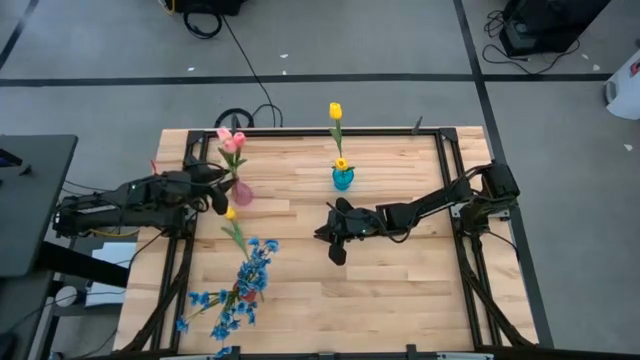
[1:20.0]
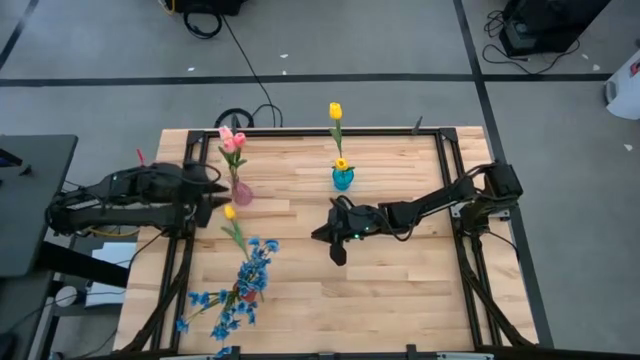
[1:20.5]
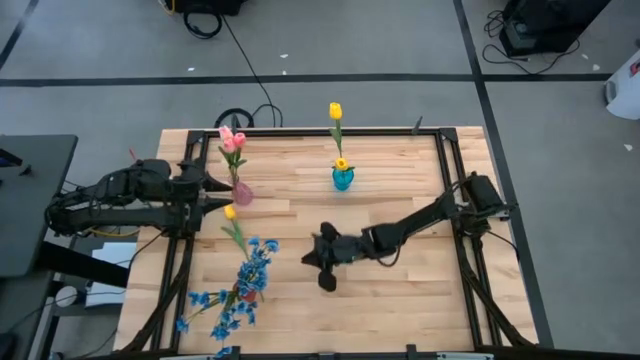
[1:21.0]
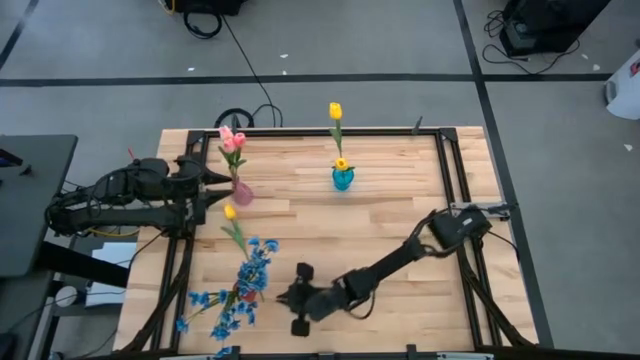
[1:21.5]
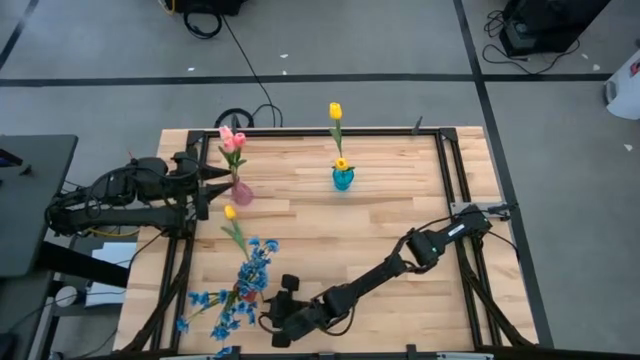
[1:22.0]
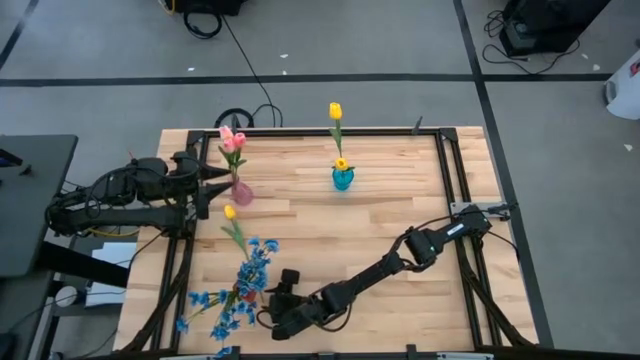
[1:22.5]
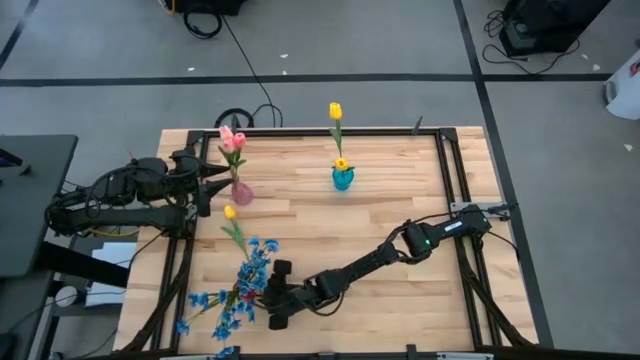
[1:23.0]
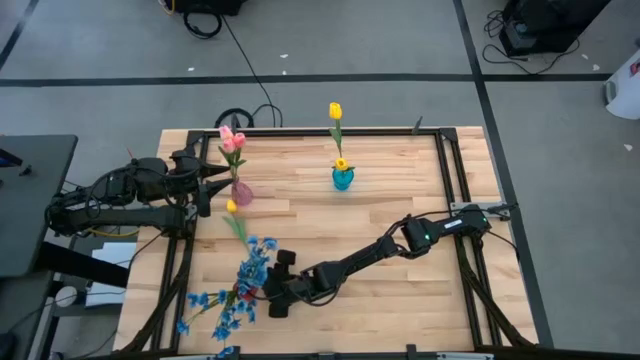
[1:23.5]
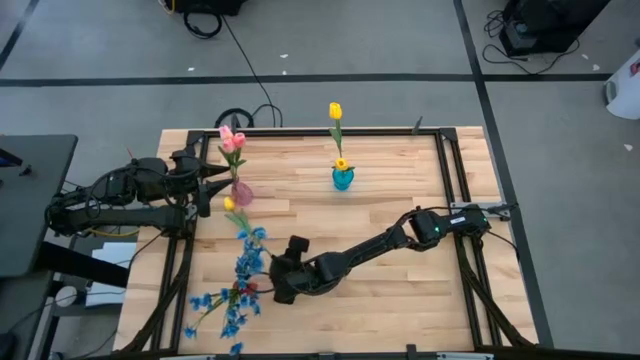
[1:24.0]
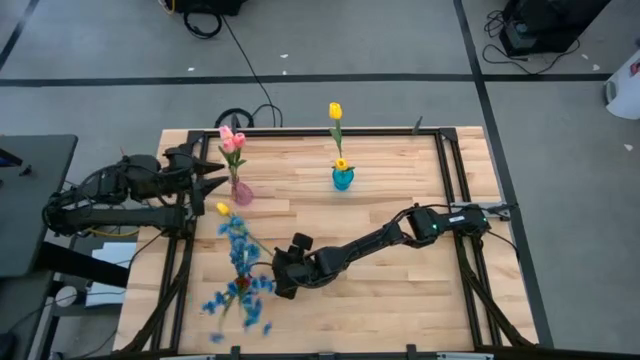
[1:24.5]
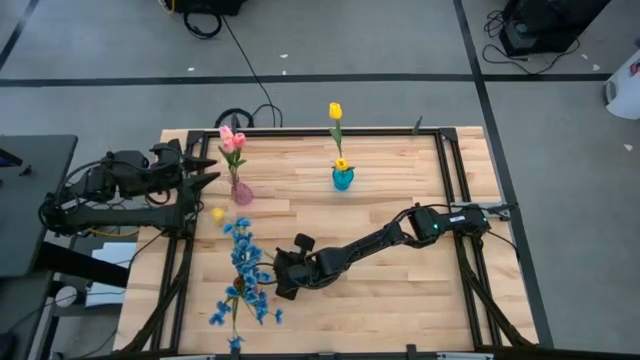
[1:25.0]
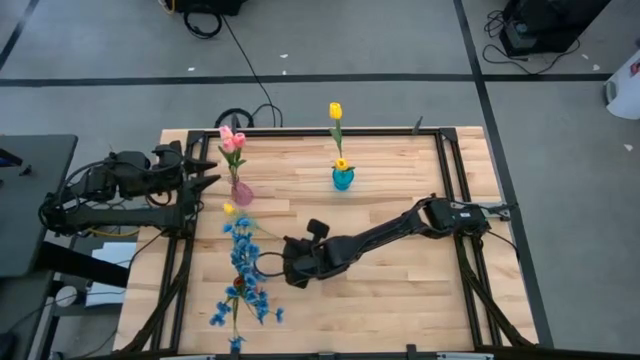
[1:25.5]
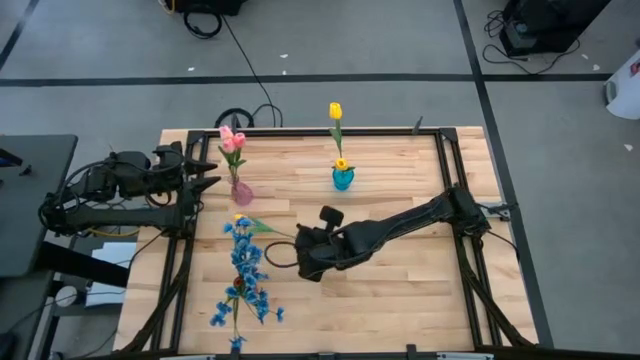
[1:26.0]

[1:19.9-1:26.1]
Task: Sort flowers into vase by color
Put the yellow tulip into the blue vase

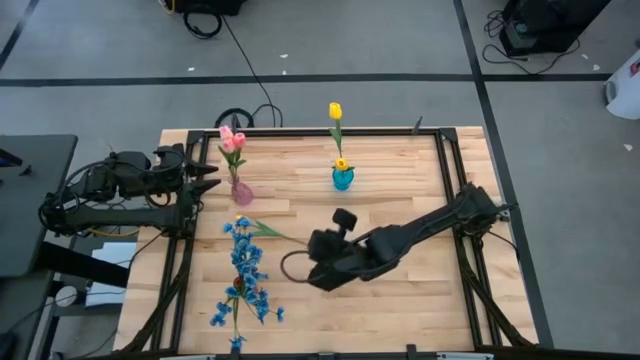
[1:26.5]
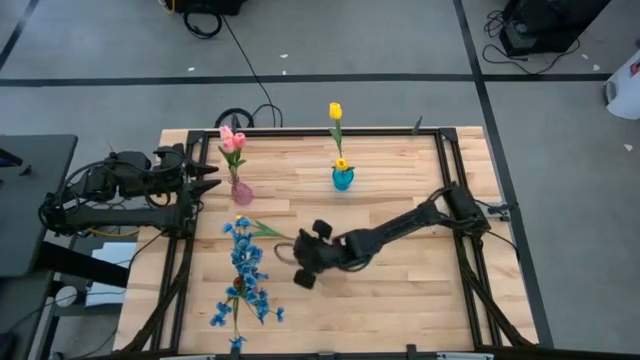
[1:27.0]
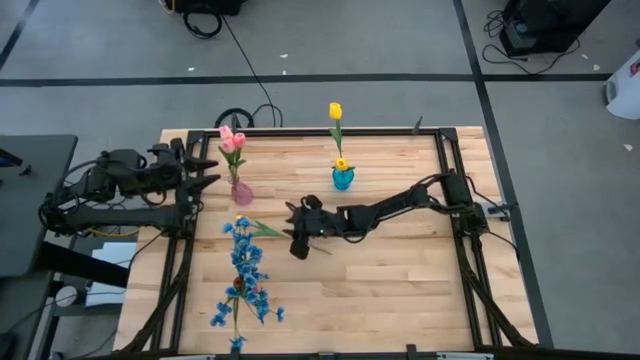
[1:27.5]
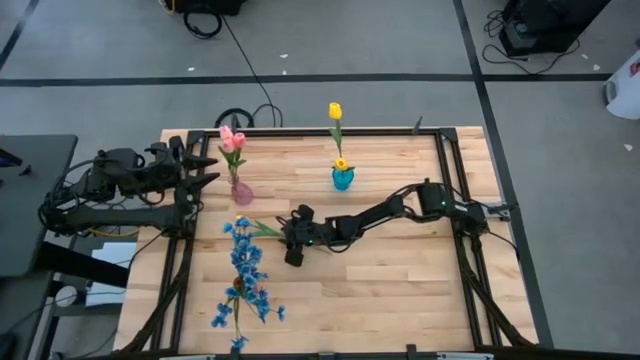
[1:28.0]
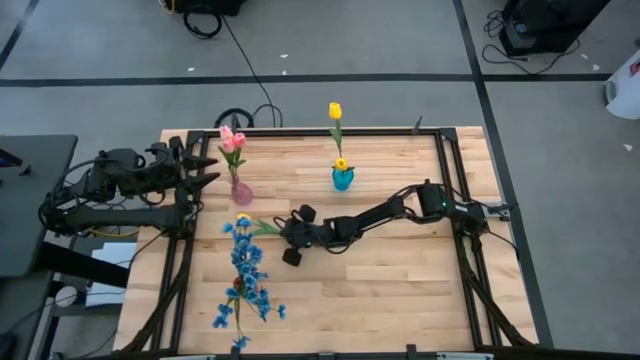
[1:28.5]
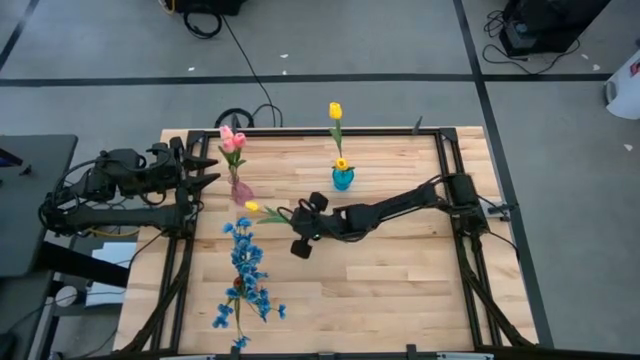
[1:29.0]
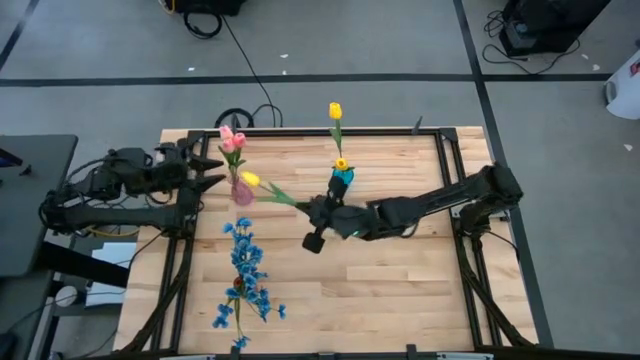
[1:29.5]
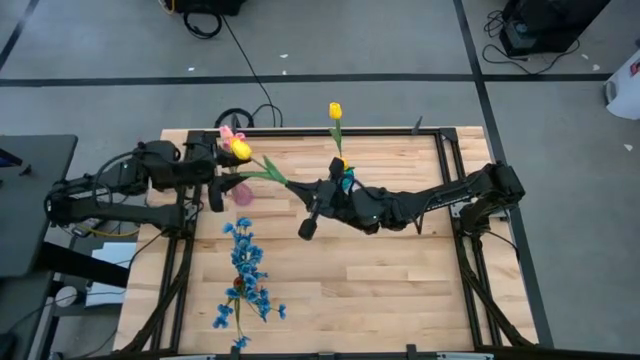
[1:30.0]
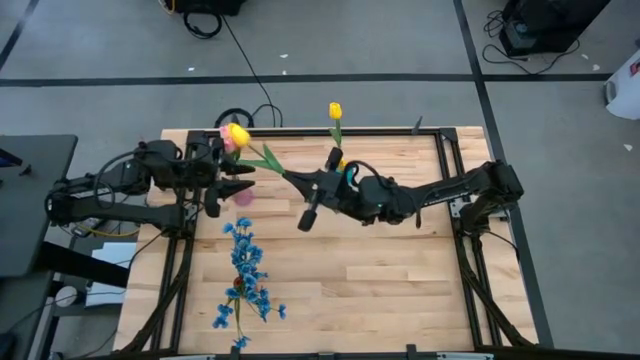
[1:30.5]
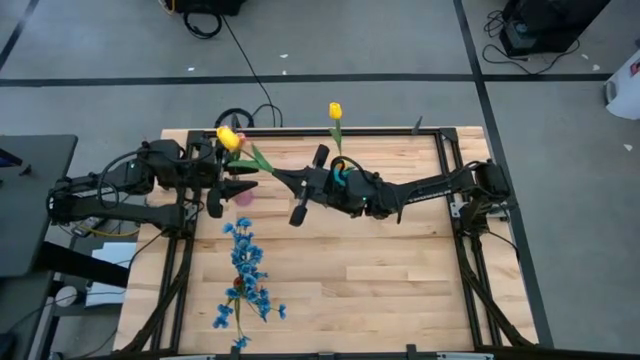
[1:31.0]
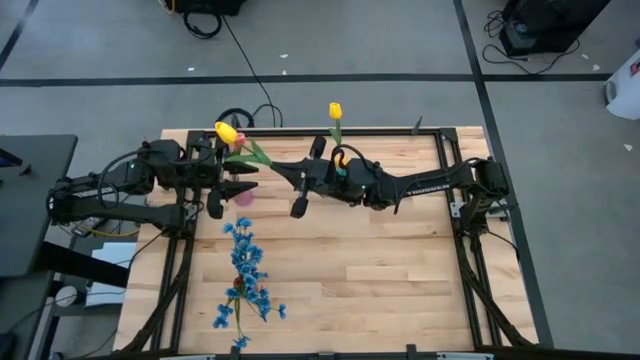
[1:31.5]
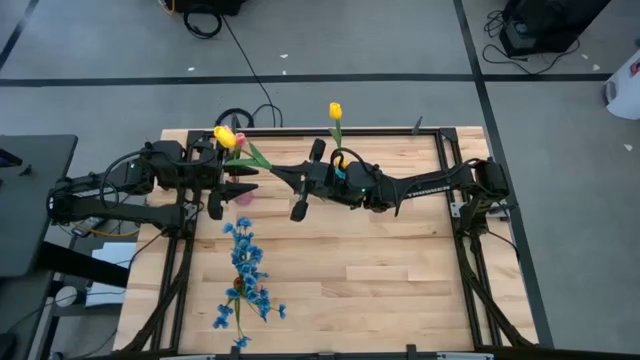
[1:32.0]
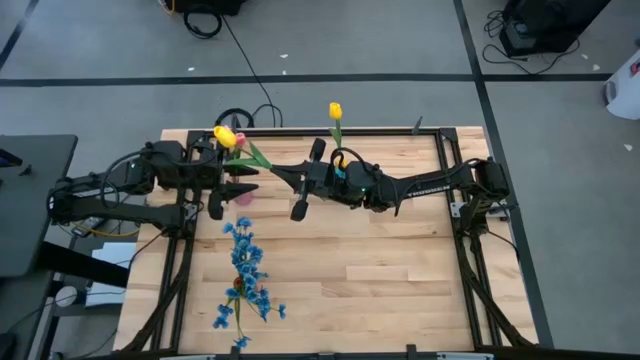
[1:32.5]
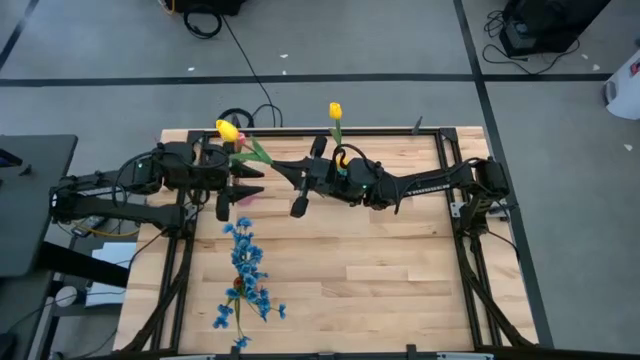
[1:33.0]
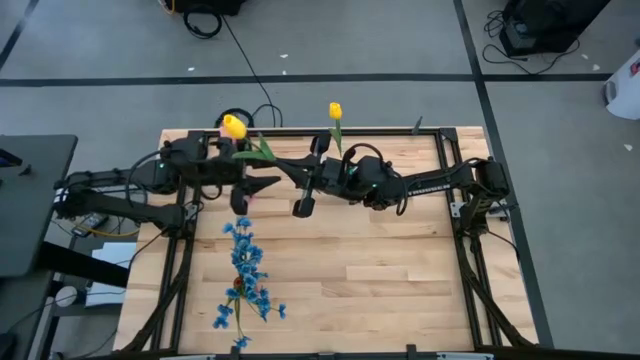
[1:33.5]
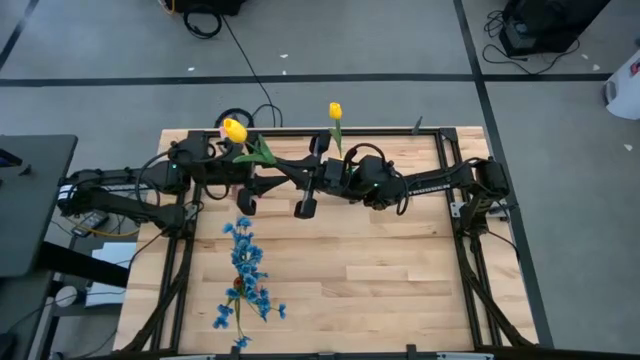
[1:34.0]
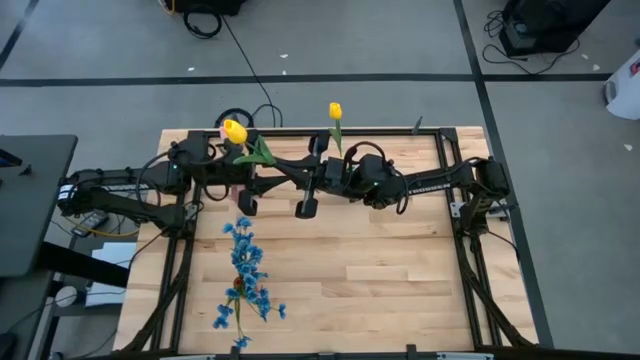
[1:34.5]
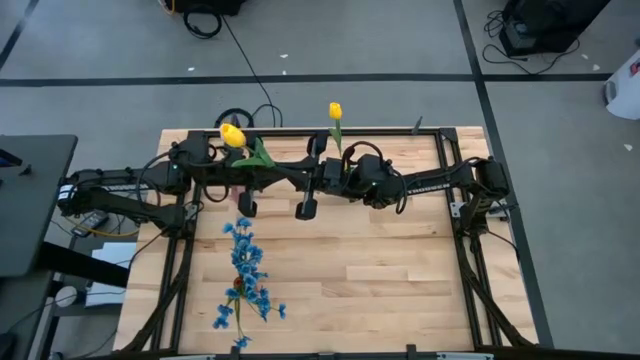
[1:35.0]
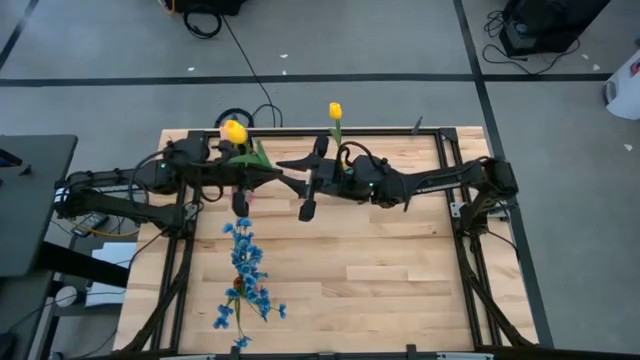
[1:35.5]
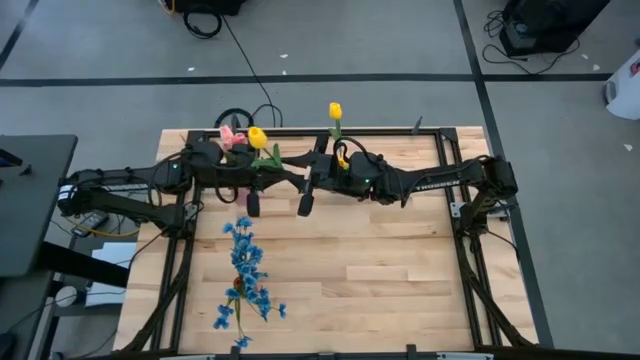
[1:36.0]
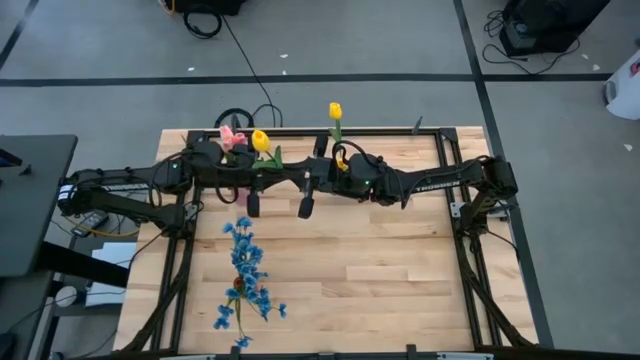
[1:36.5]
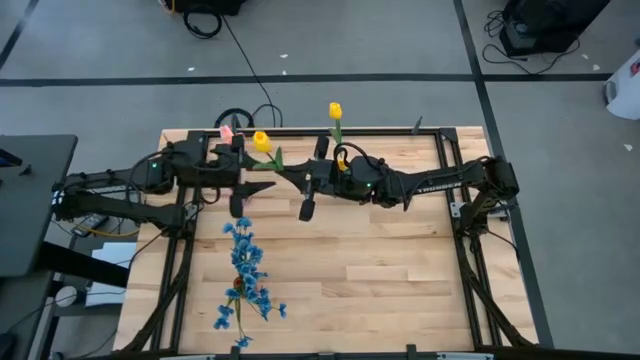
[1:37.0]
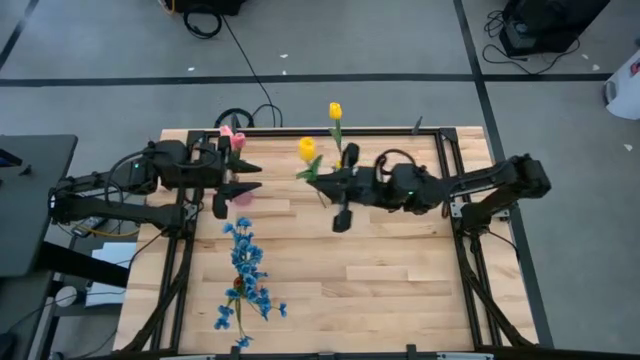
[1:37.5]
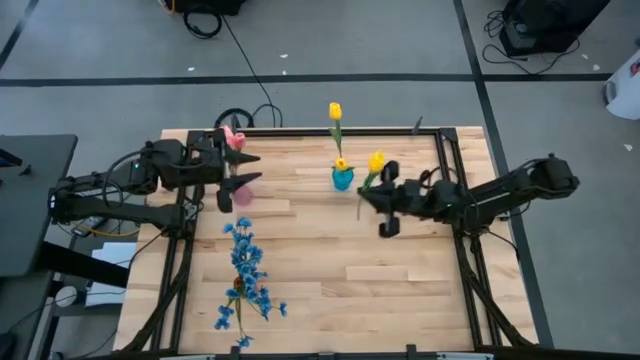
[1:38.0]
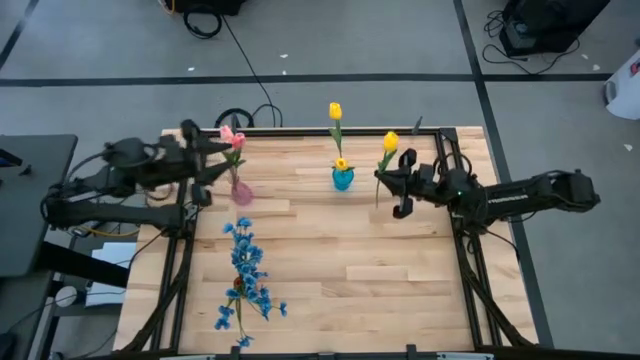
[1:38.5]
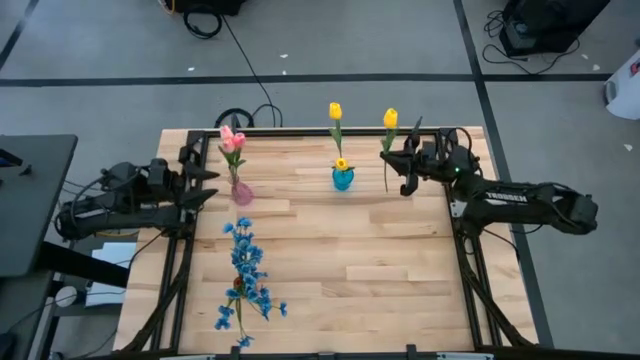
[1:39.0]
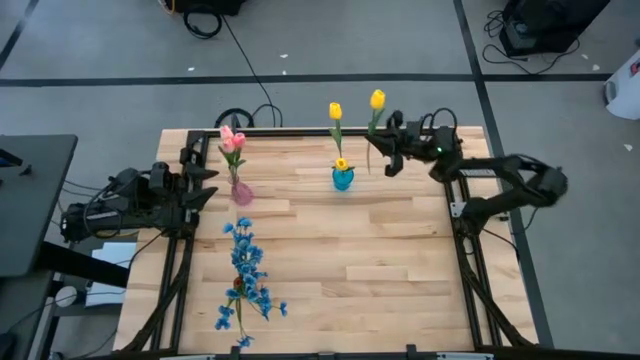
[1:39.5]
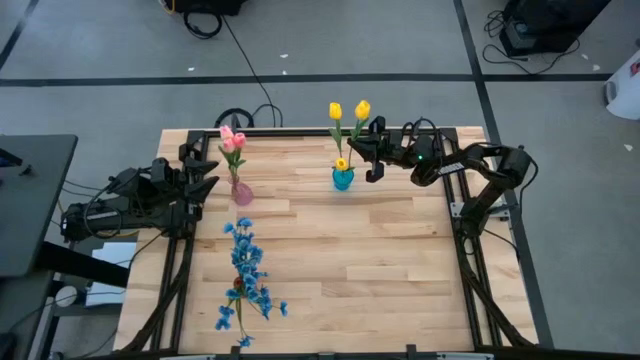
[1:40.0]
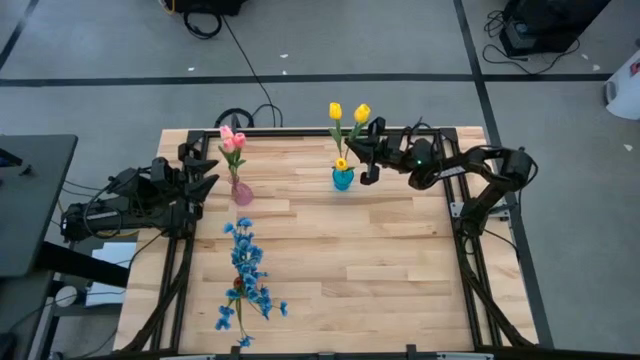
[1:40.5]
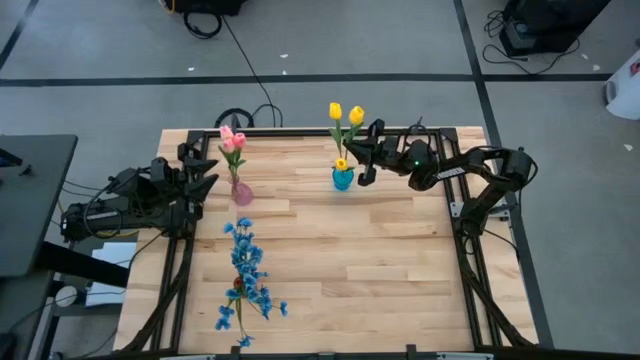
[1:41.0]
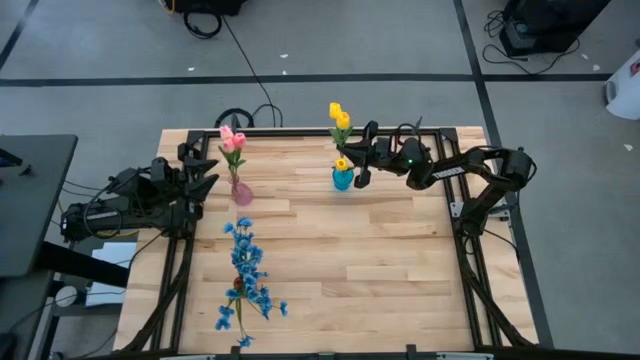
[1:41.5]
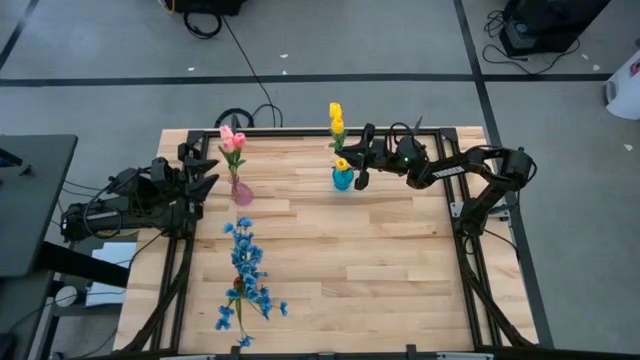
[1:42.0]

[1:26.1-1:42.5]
Put the yellow tulip into the blue vase
